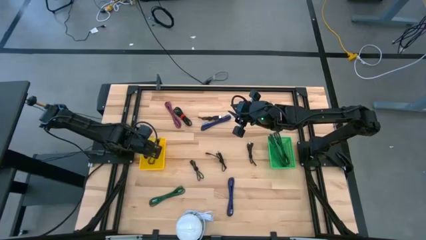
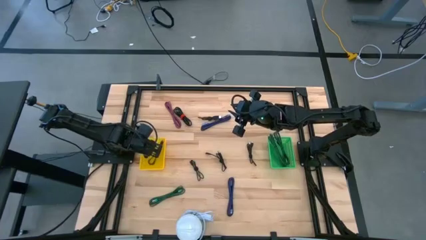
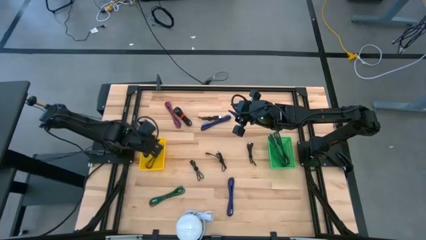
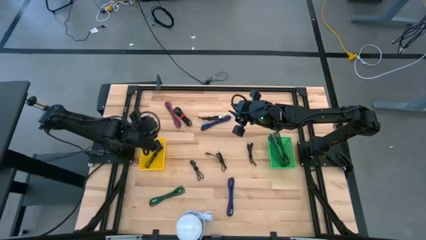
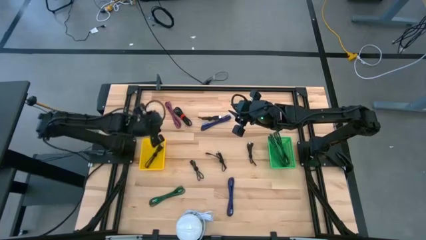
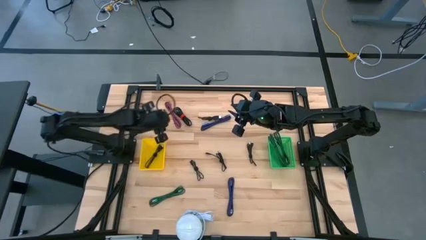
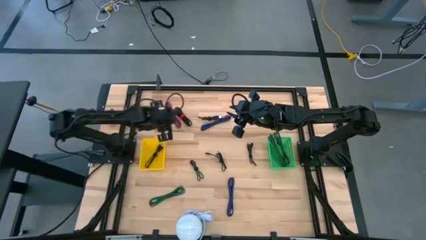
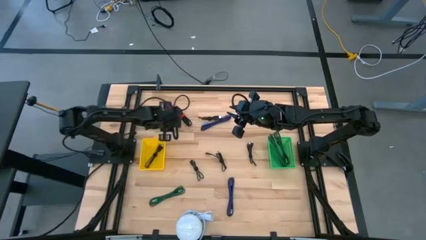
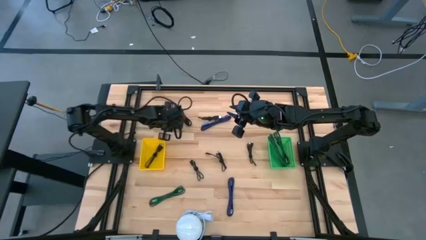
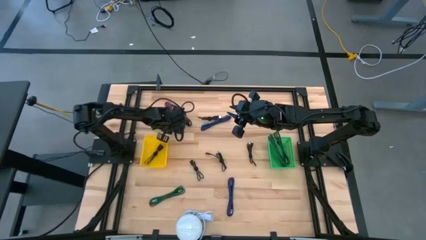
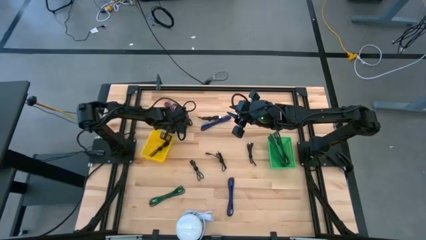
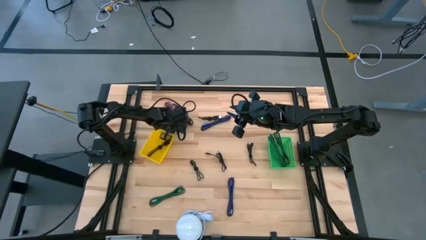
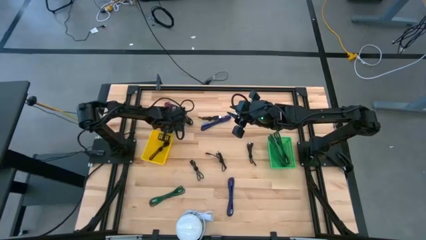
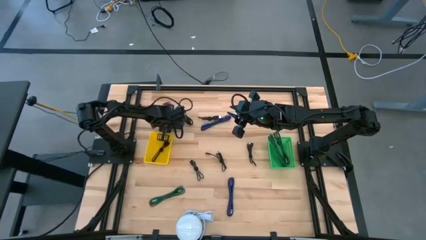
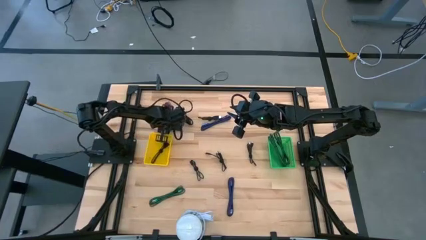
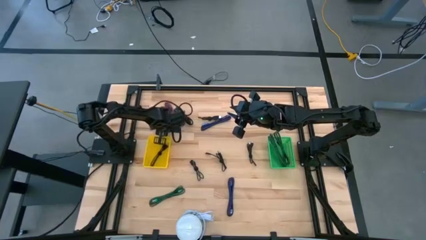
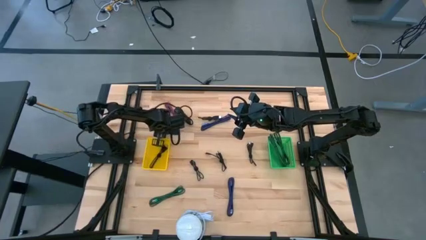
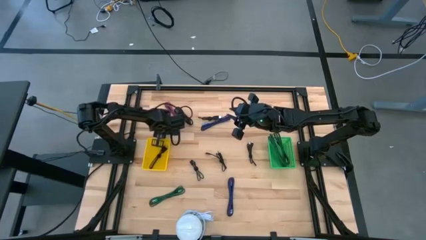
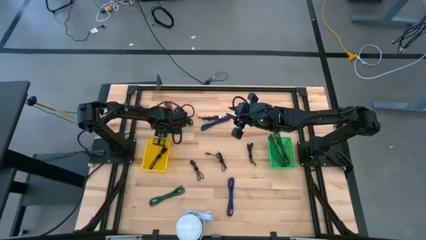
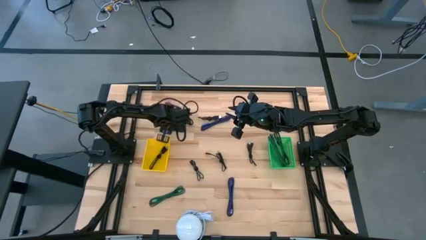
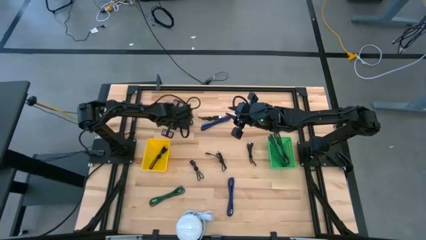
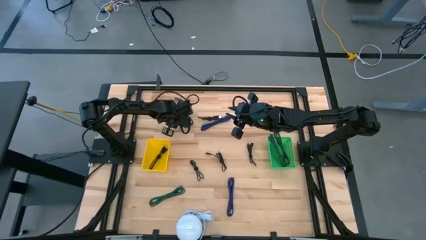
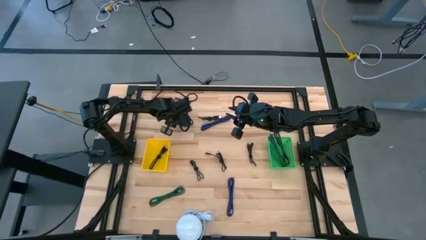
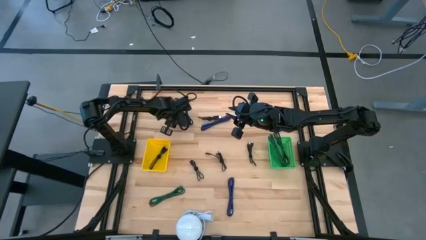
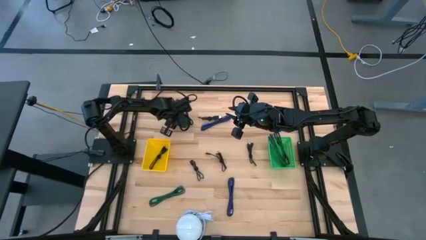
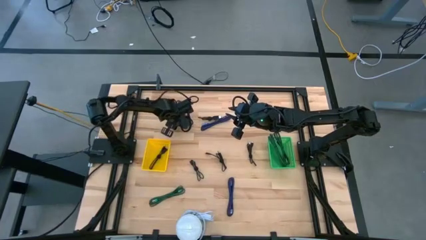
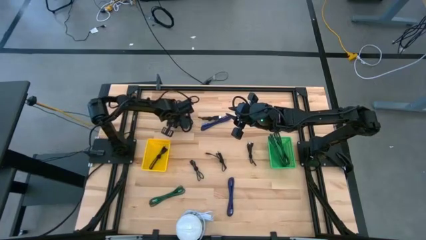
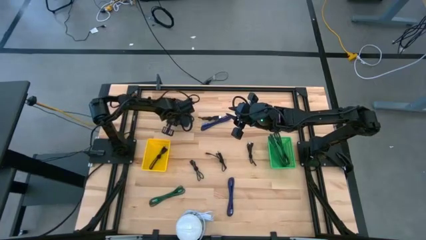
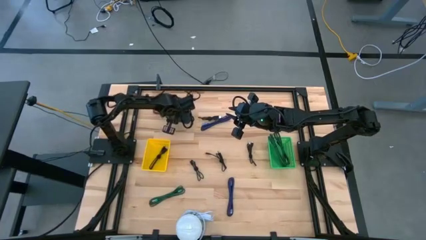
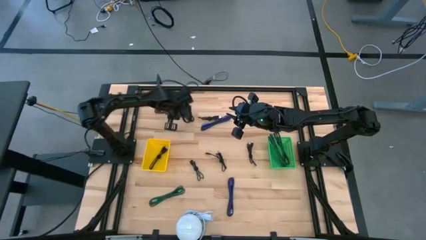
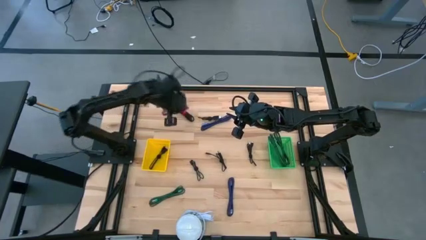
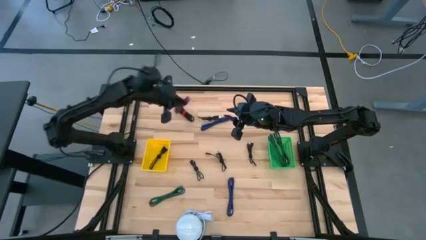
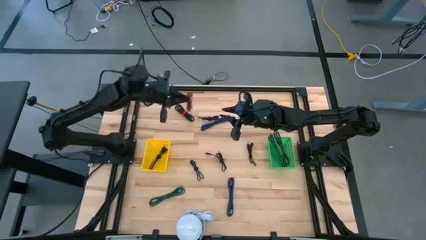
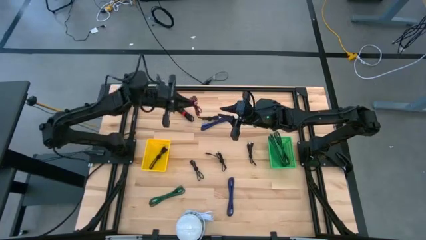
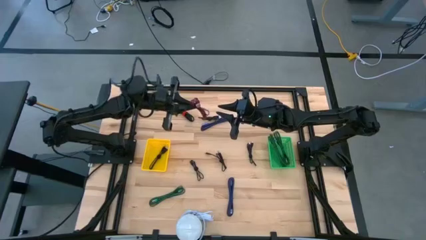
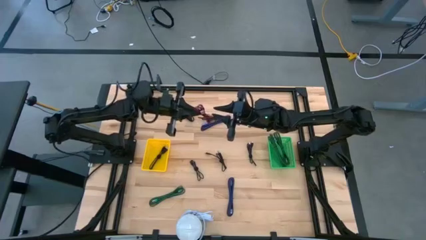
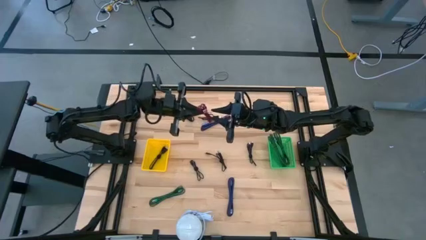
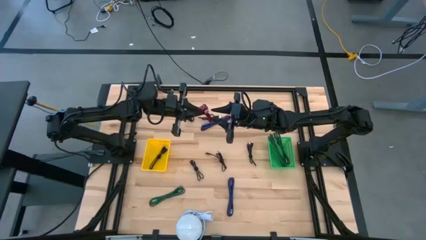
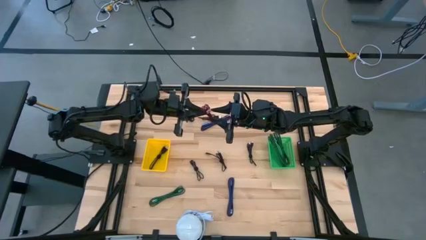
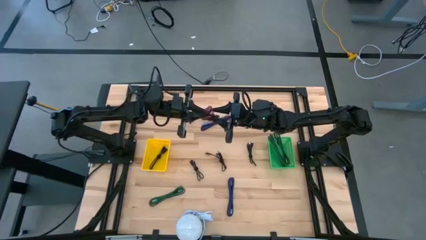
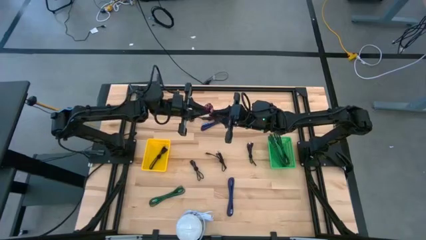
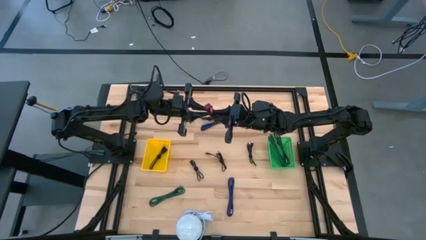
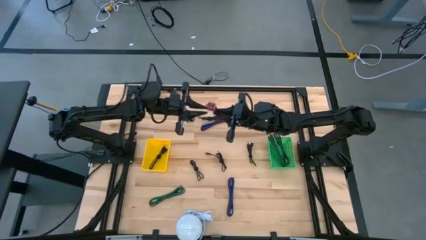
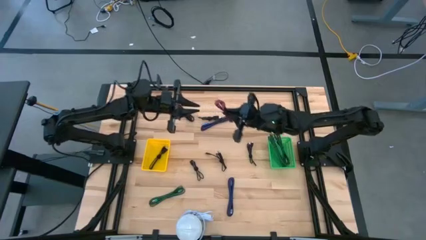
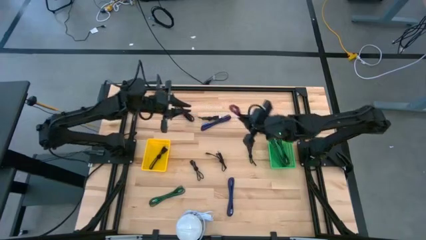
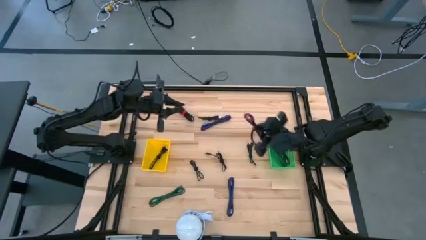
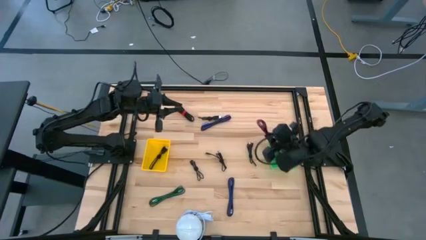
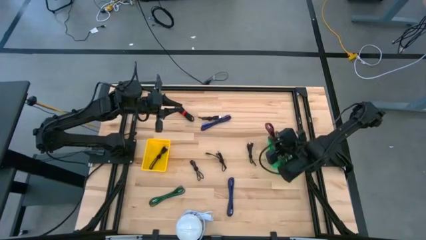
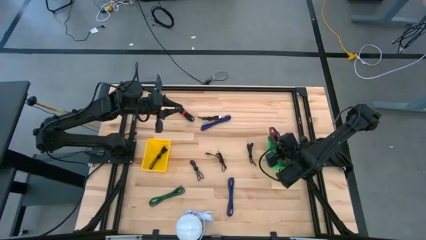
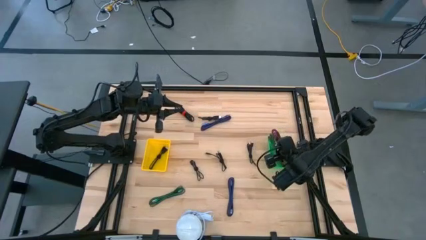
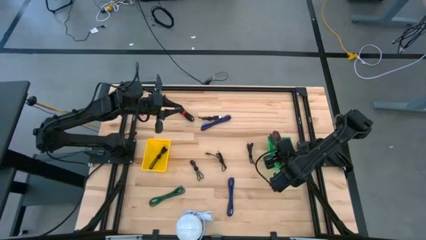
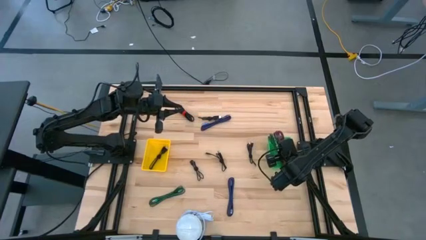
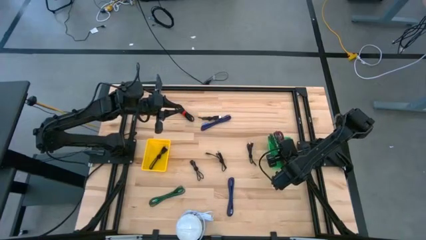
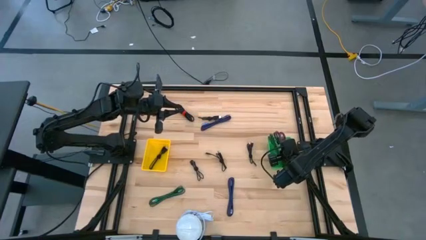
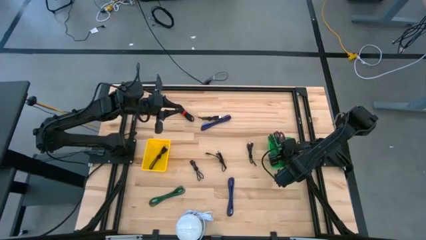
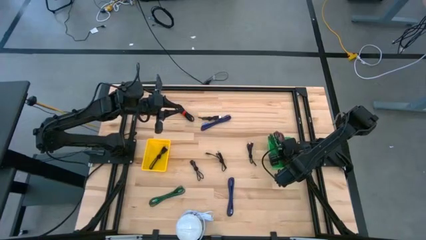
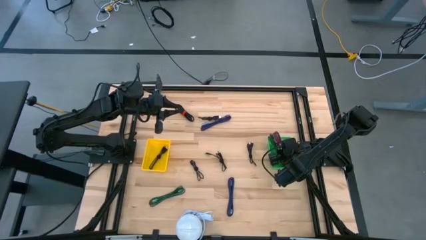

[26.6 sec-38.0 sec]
Task: Pick & Place USB Port
Put the black and pink charger cable into the green basket

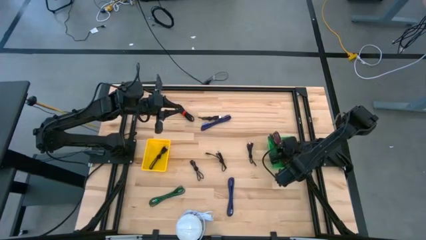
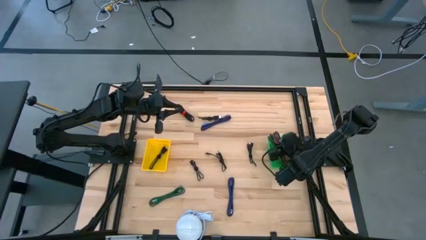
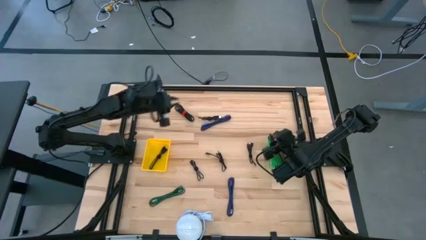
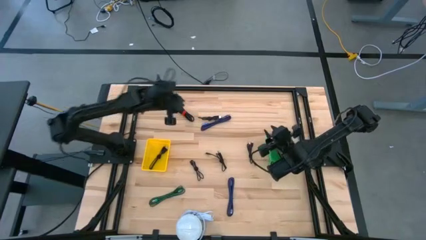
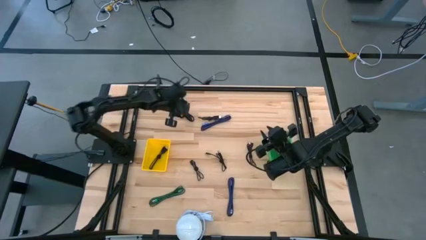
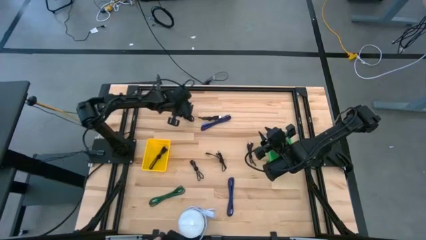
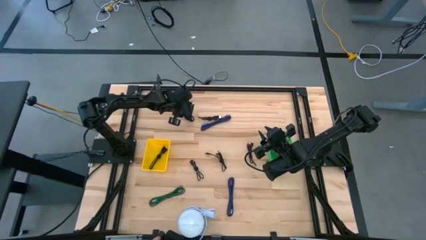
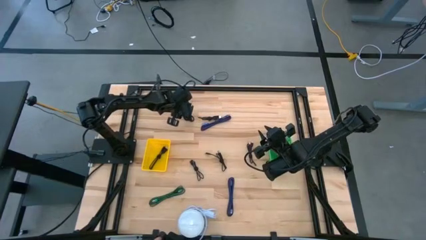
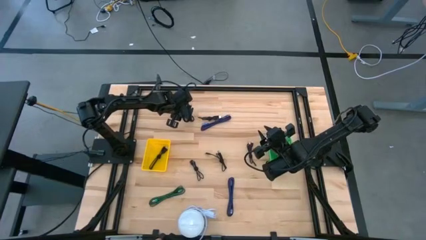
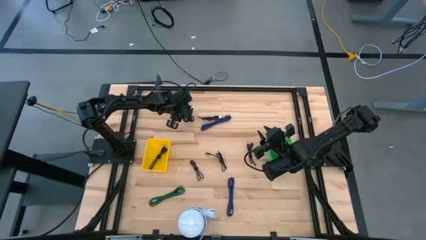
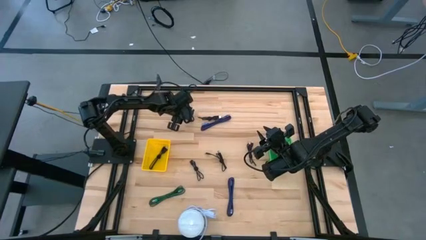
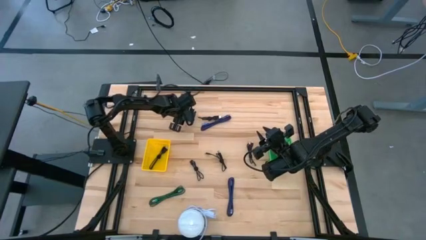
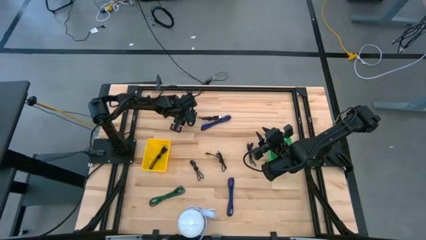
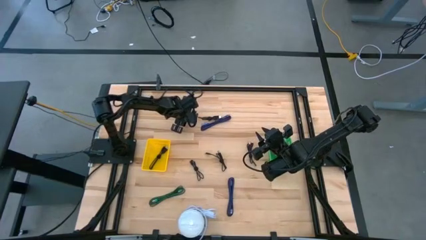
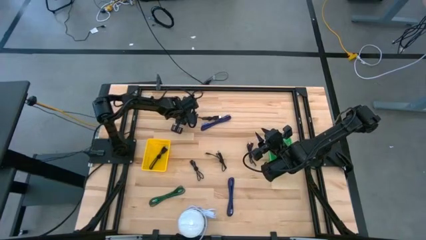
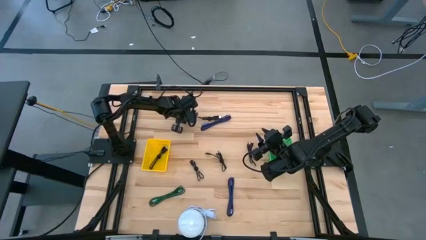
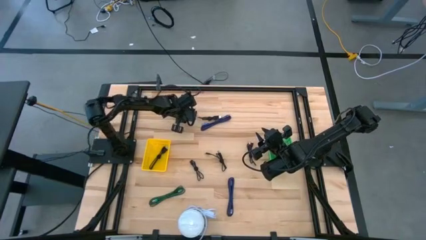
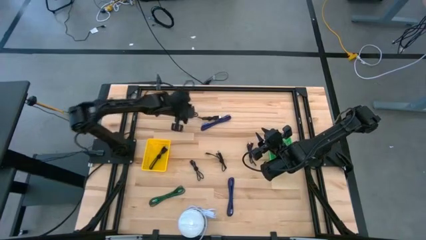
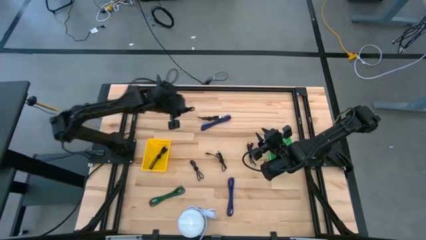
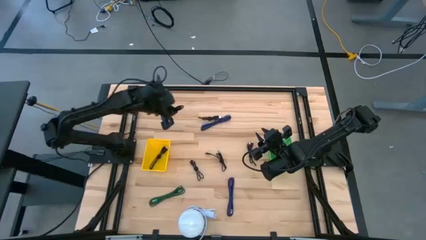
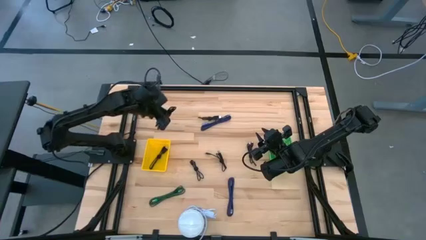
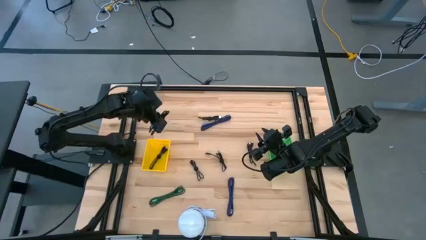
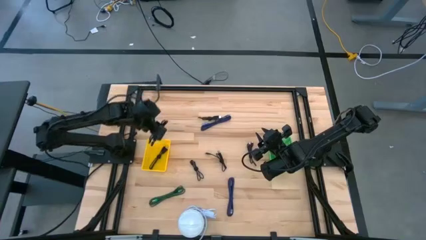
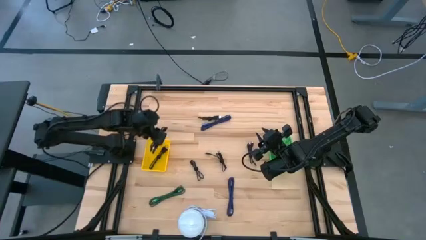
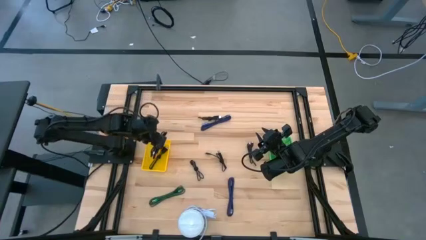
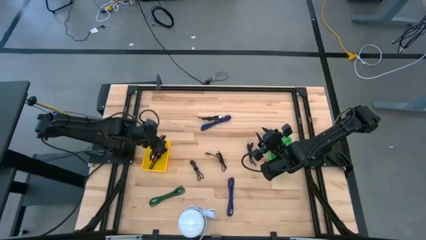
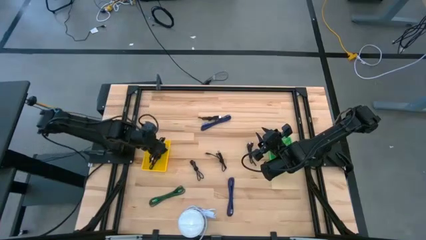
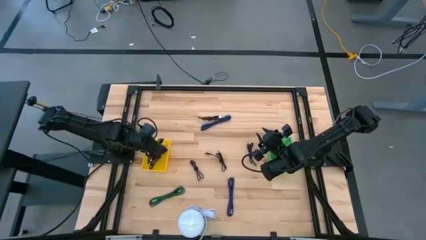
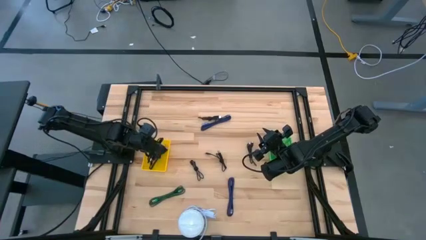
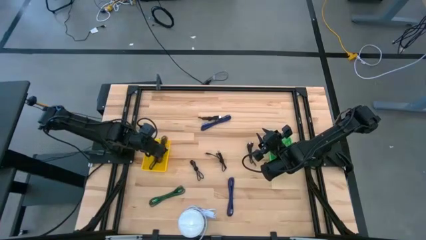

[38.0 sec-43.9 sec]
Put the black charger cable into the yellow basket
